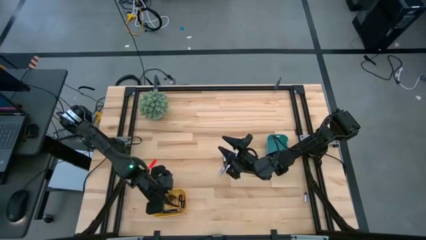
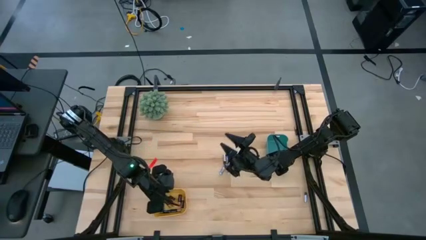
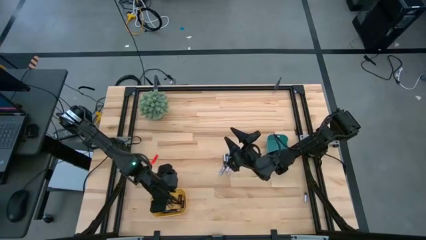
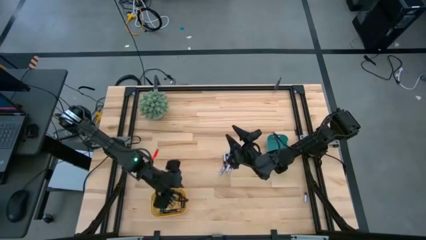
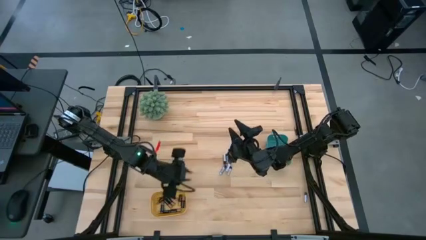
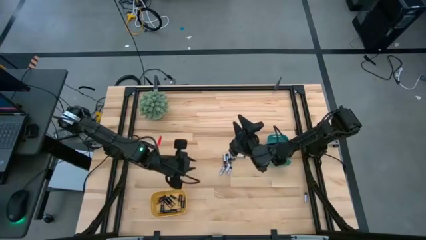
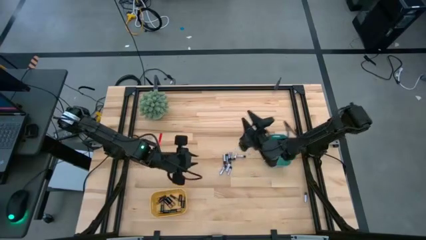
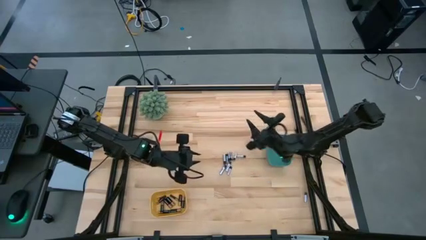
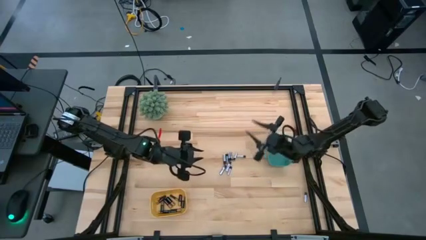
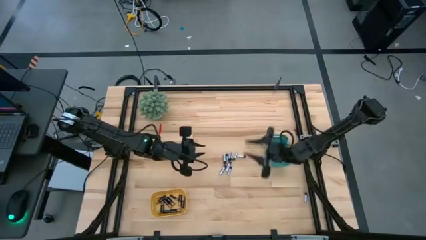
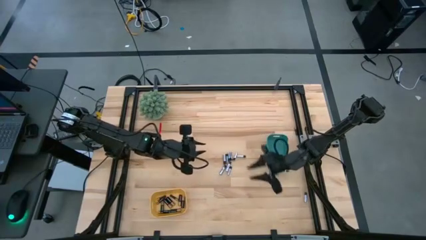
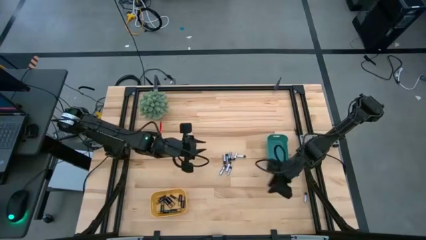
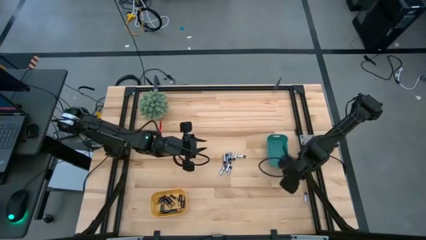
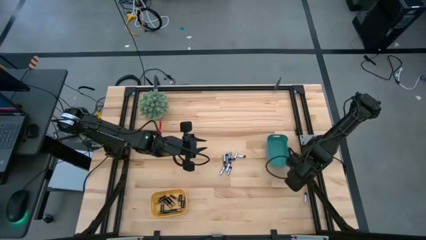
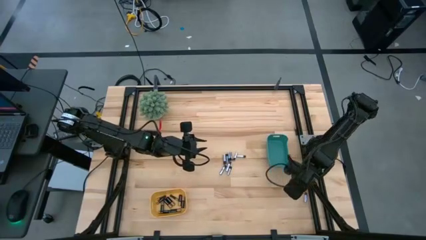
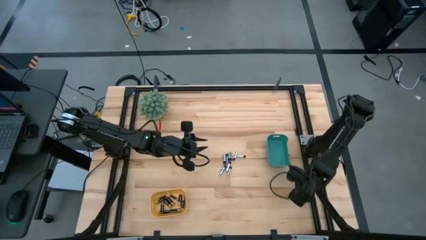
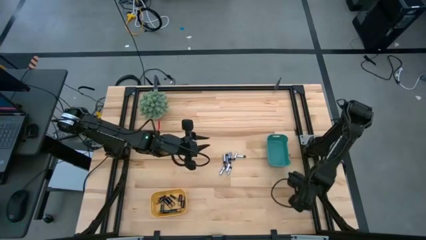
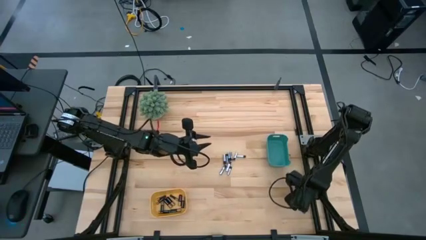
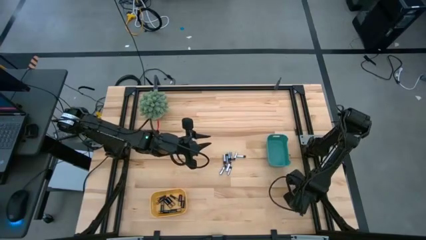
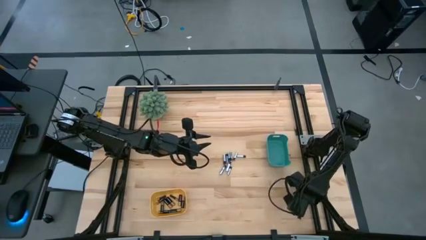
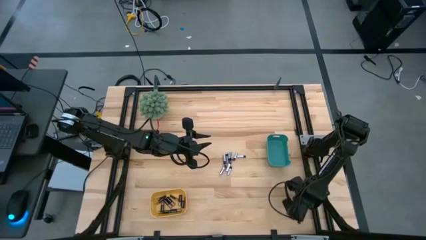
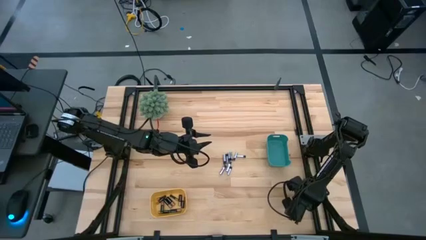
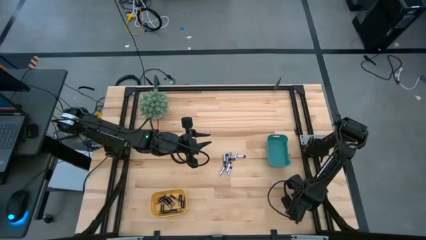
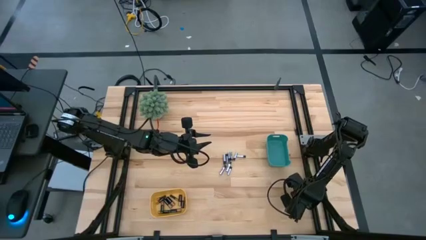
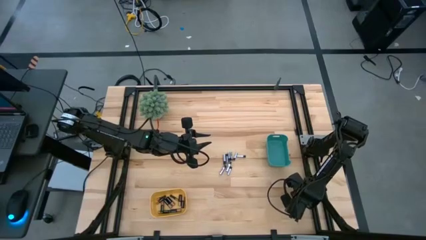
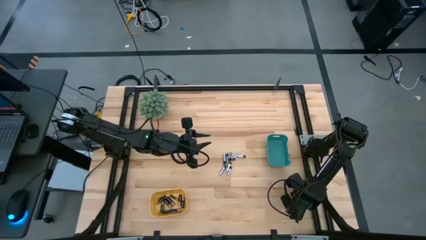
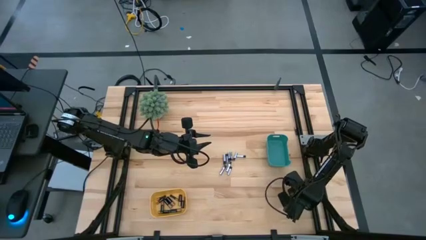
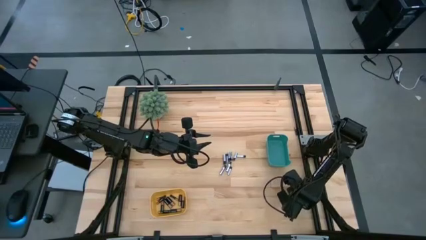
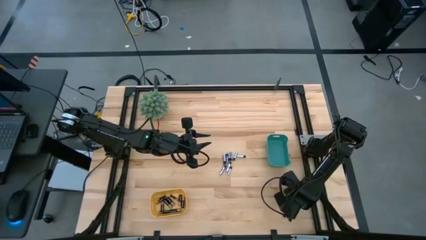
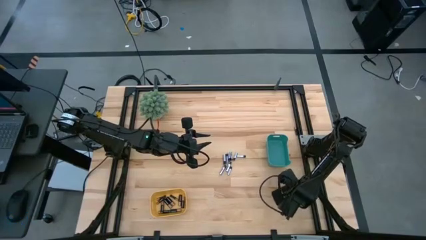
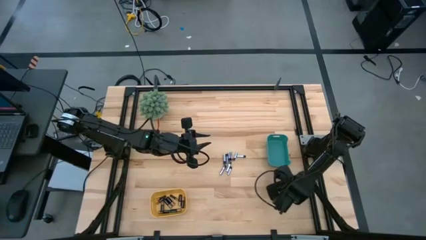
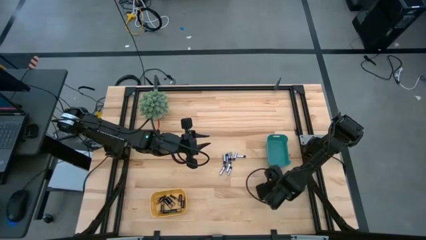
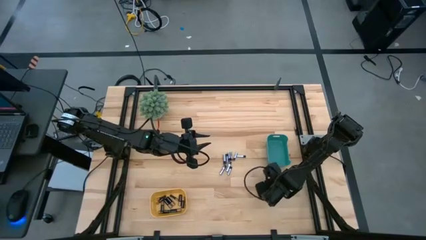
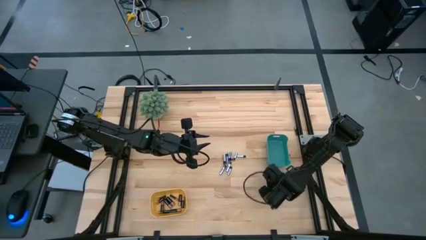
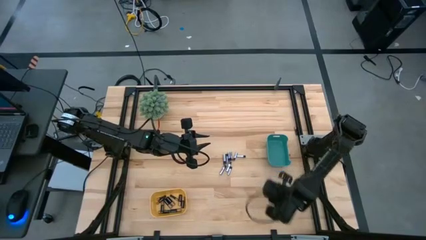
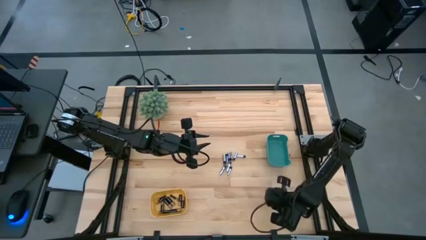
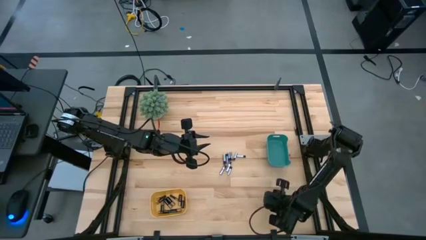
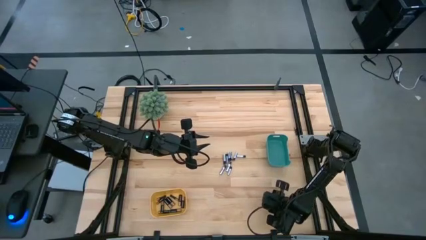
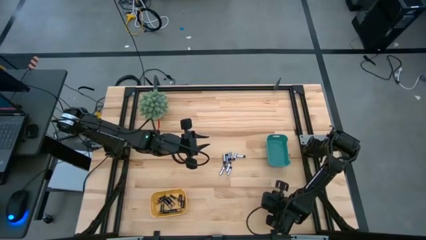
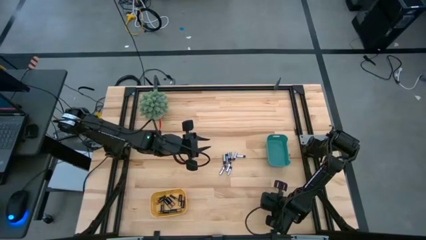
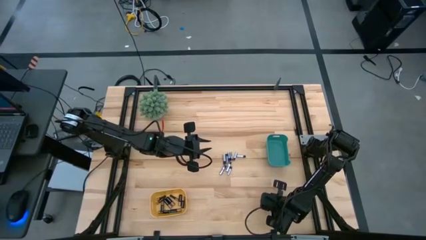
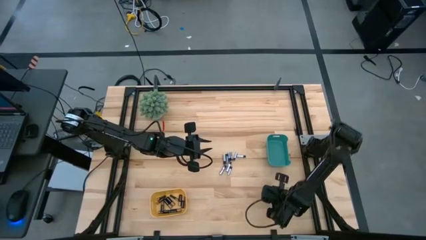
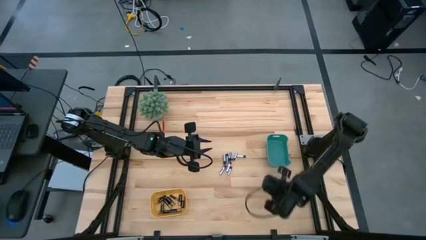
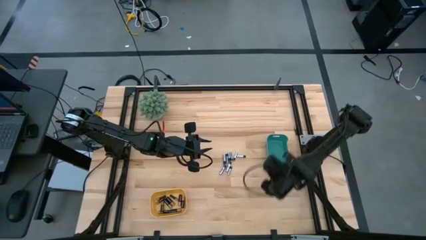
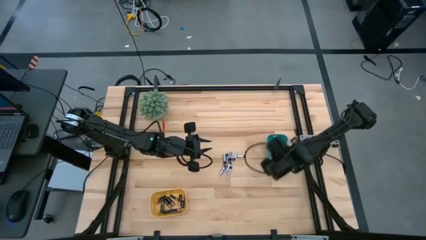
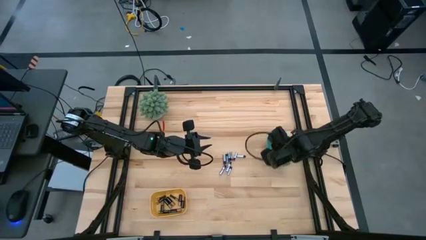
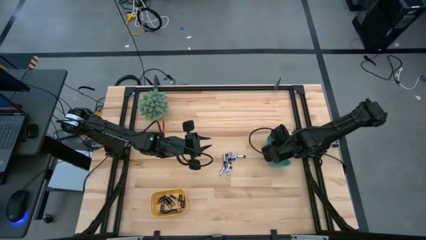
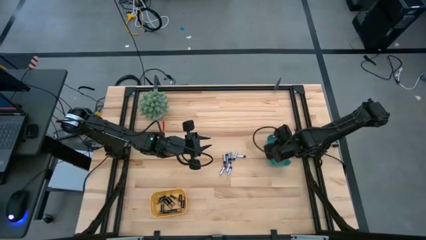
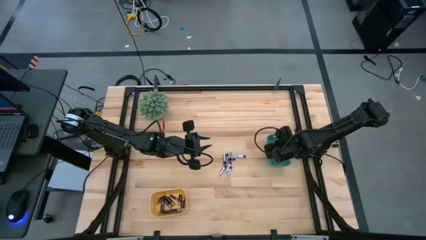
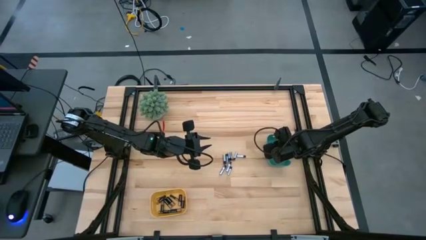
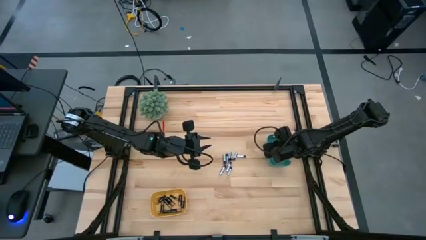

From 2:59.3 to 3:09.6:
Task: Sort batteries
Put the silver battery into the green bin

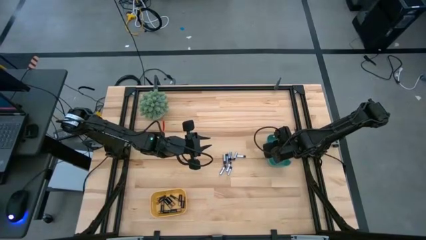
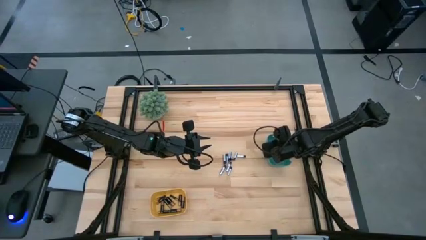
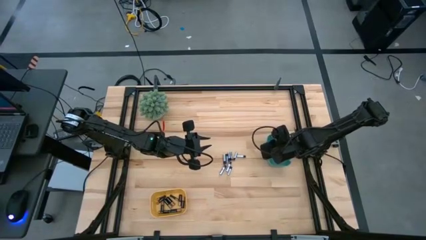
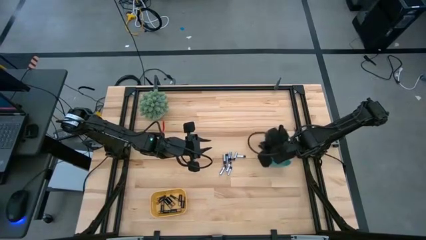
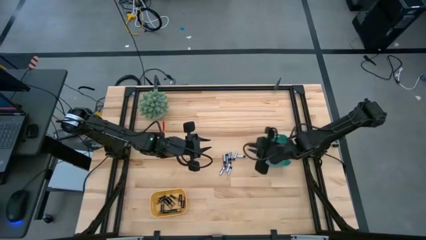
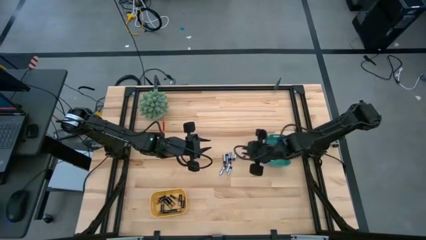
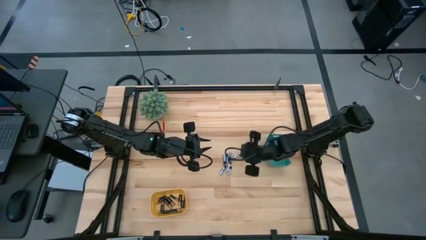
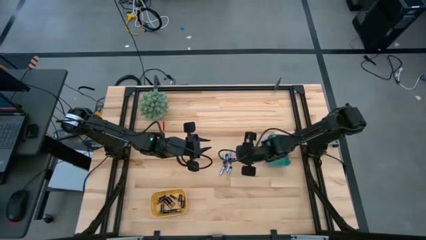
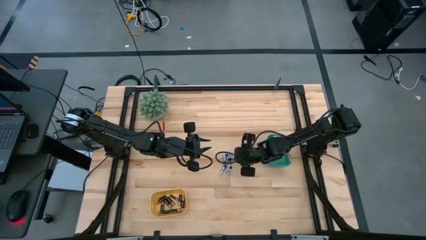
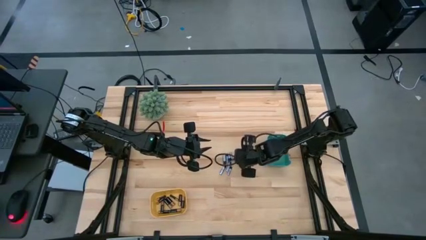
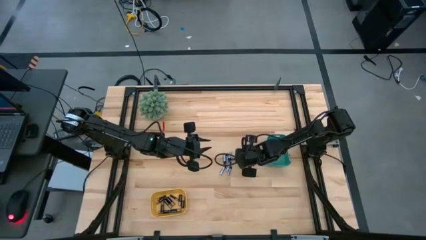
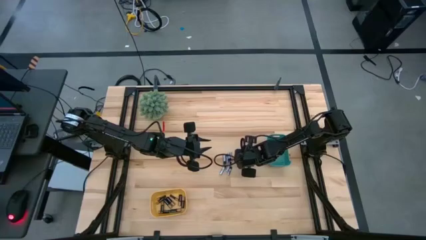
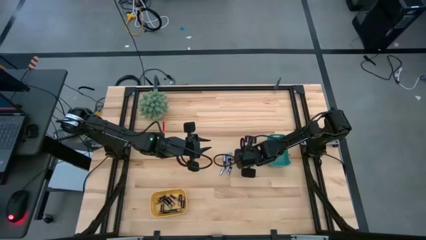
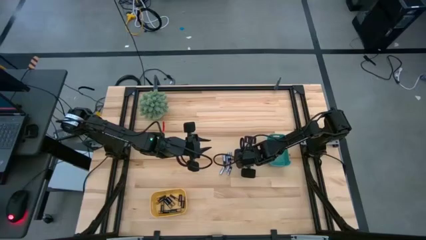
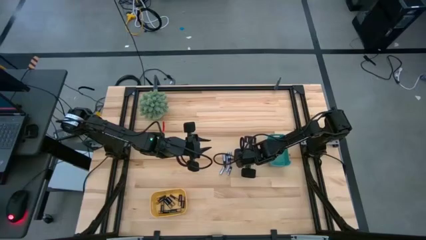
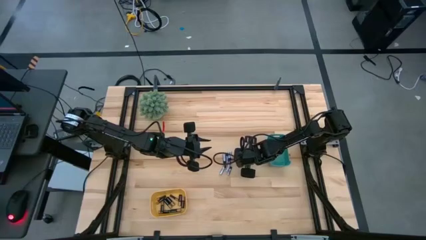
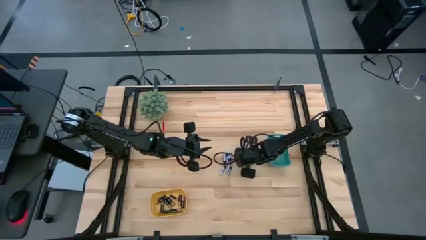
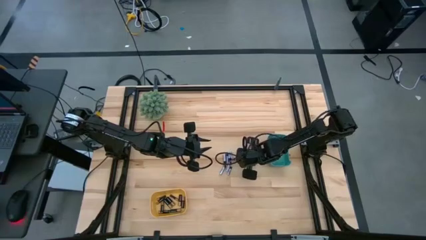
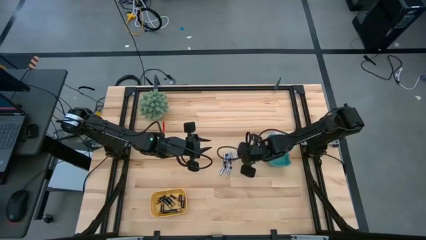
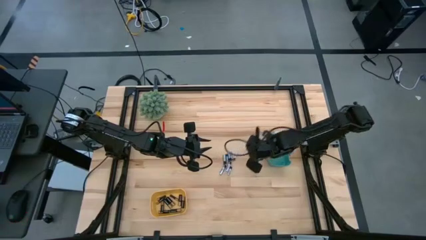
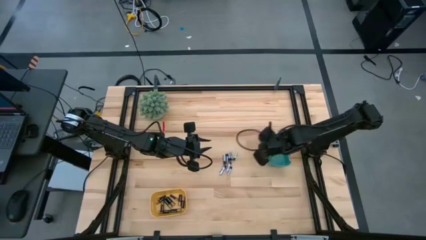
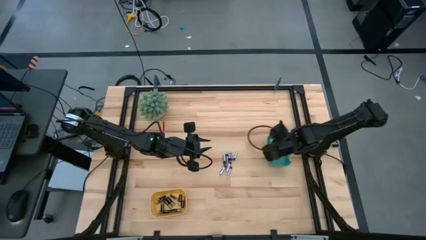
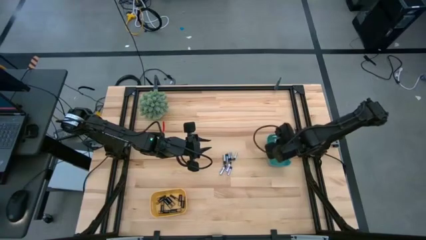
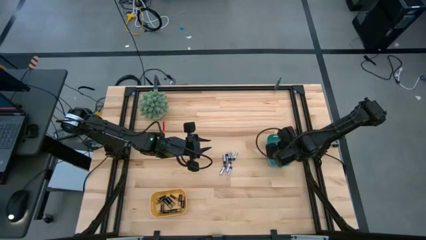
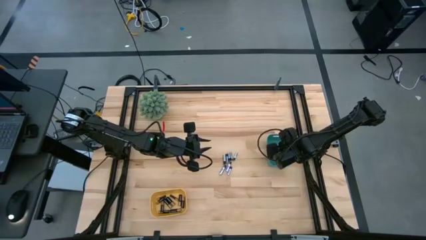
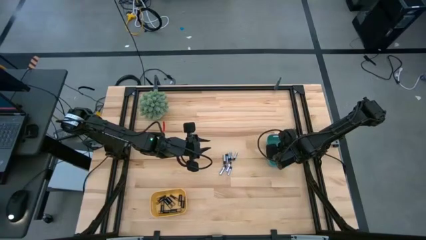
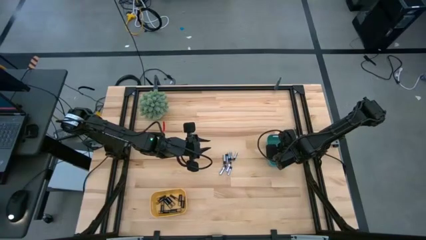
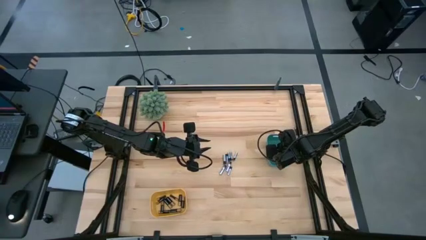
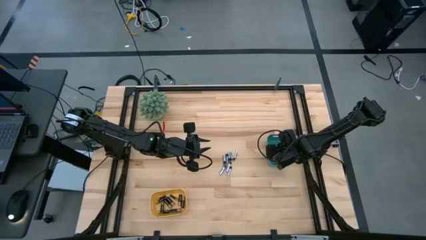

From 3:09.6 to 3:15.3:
Put the silver battery into the green bin
